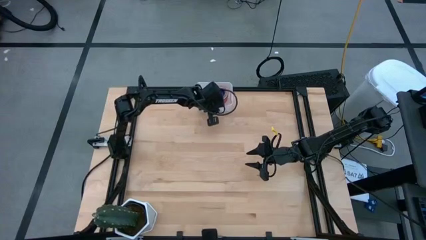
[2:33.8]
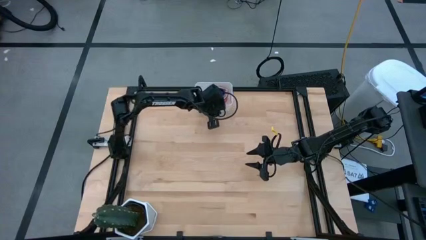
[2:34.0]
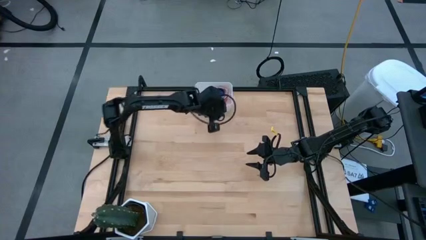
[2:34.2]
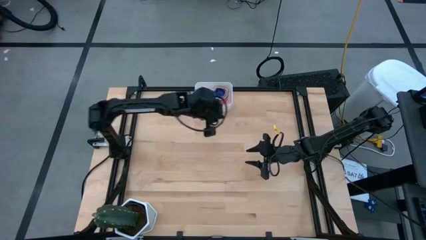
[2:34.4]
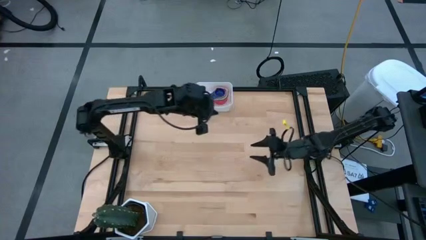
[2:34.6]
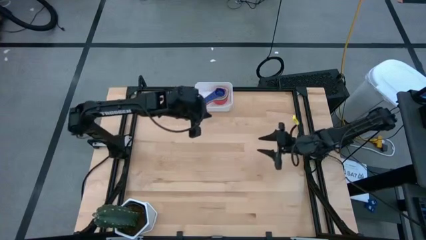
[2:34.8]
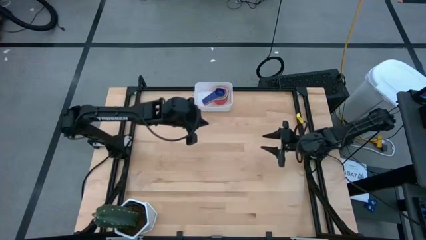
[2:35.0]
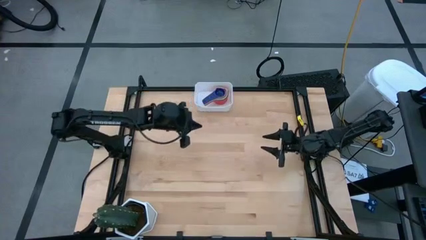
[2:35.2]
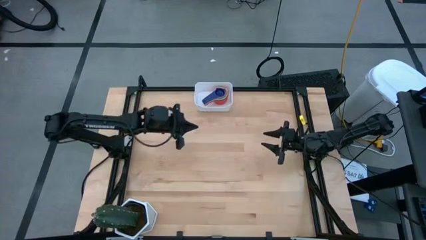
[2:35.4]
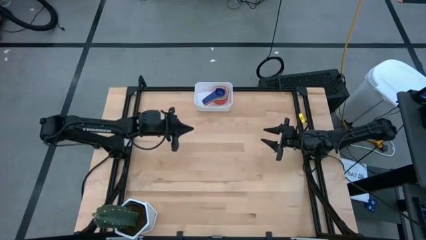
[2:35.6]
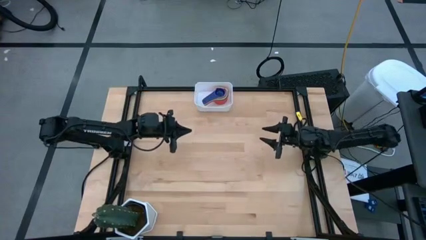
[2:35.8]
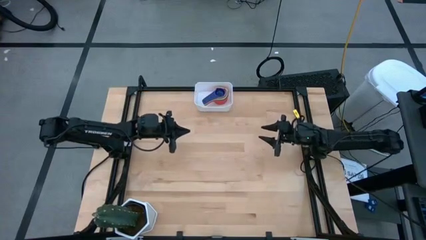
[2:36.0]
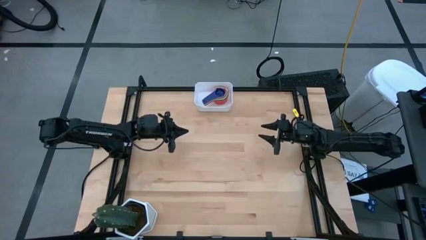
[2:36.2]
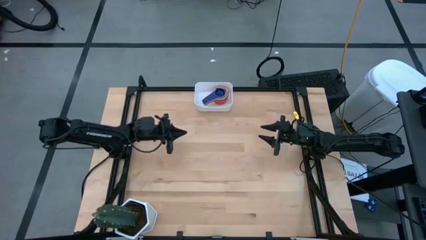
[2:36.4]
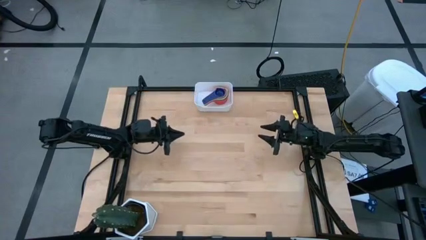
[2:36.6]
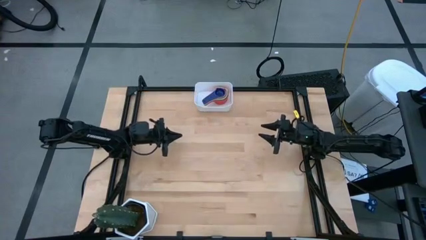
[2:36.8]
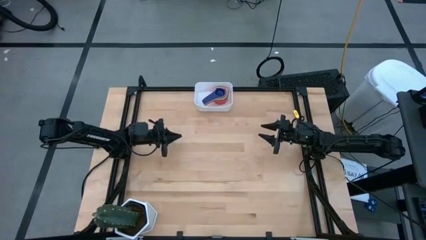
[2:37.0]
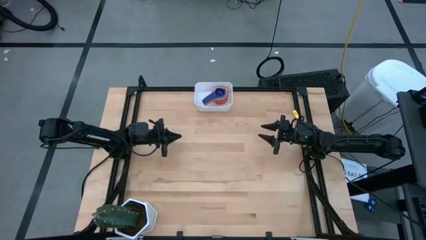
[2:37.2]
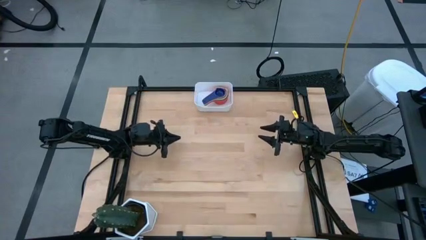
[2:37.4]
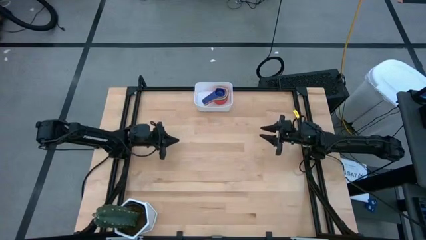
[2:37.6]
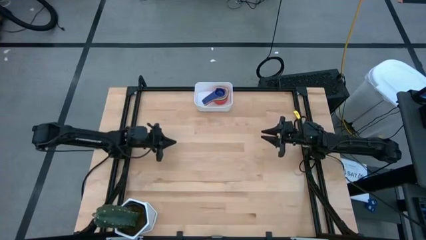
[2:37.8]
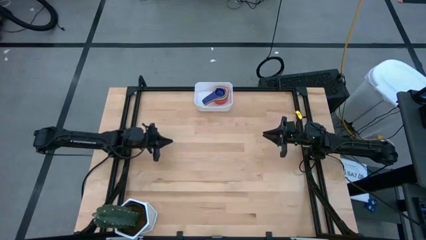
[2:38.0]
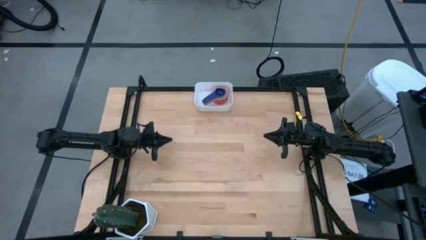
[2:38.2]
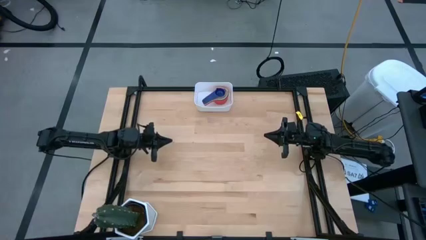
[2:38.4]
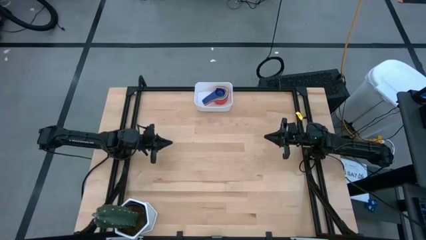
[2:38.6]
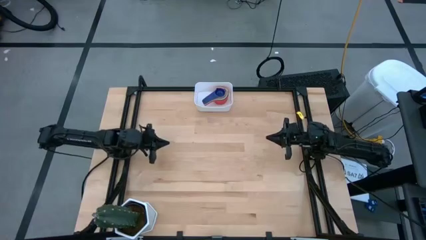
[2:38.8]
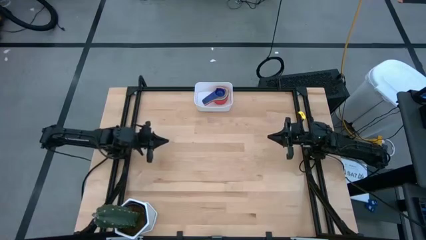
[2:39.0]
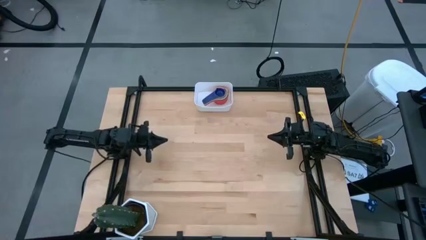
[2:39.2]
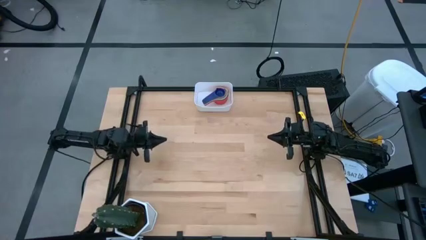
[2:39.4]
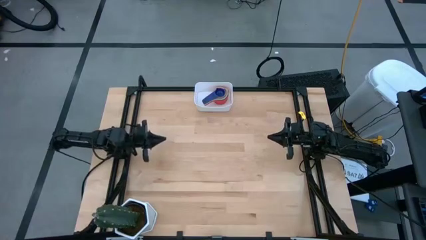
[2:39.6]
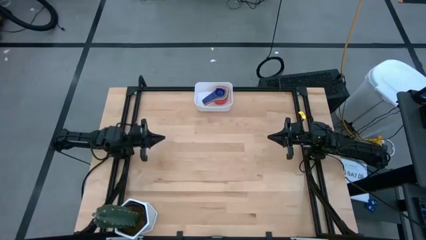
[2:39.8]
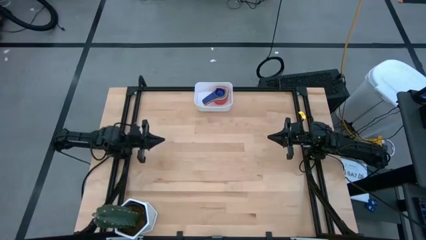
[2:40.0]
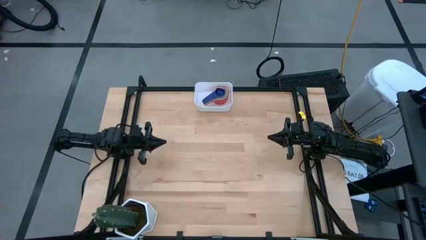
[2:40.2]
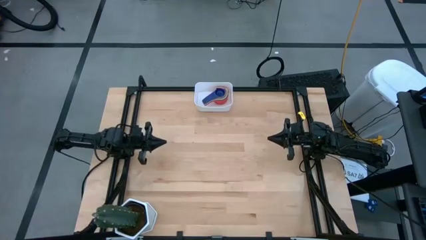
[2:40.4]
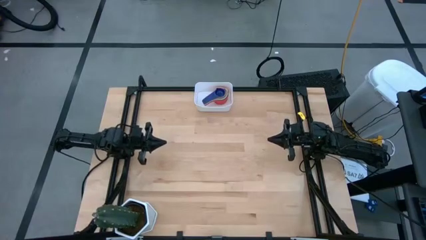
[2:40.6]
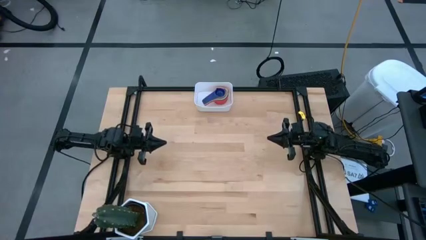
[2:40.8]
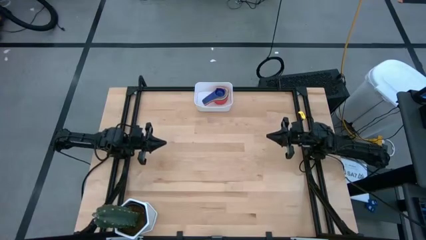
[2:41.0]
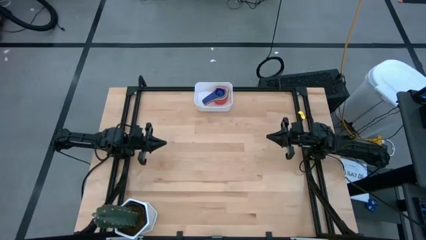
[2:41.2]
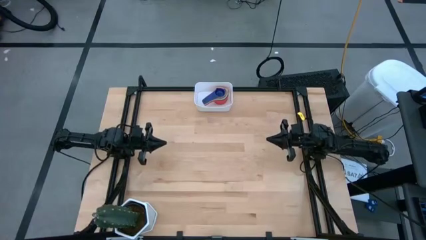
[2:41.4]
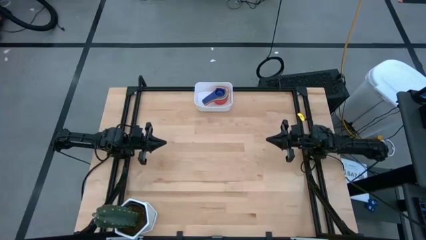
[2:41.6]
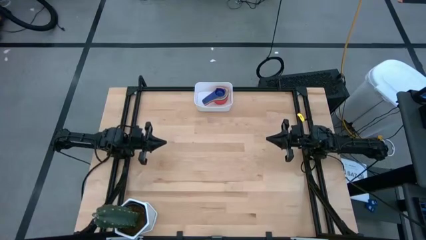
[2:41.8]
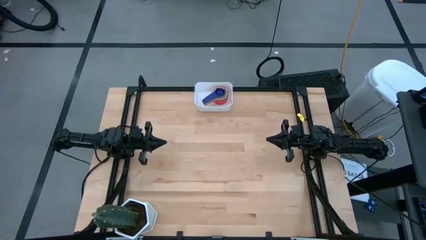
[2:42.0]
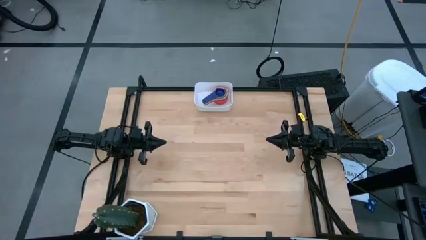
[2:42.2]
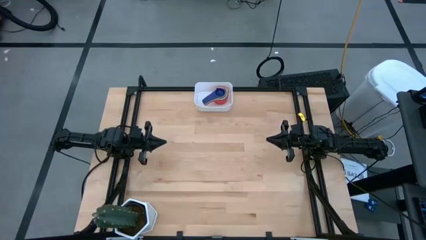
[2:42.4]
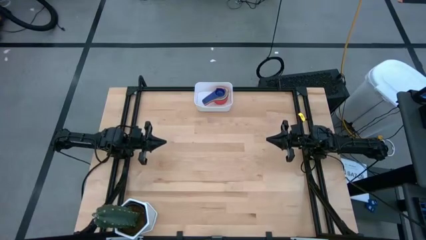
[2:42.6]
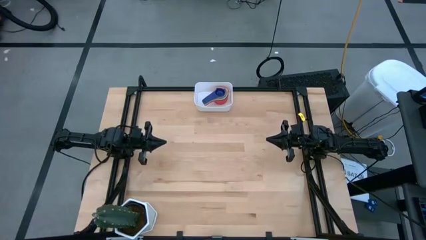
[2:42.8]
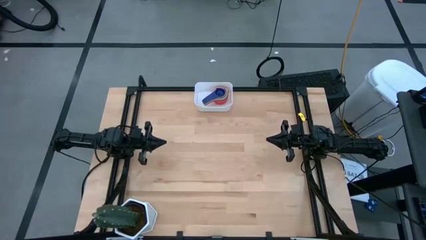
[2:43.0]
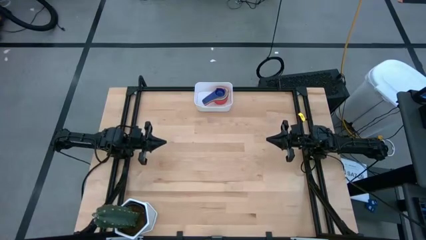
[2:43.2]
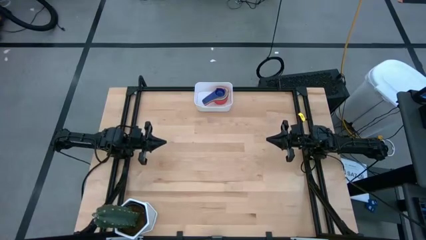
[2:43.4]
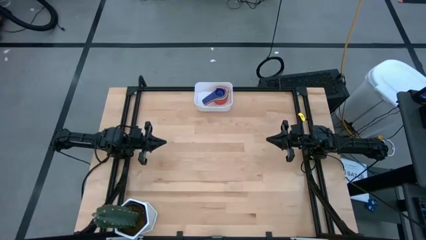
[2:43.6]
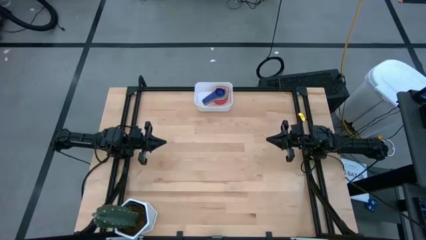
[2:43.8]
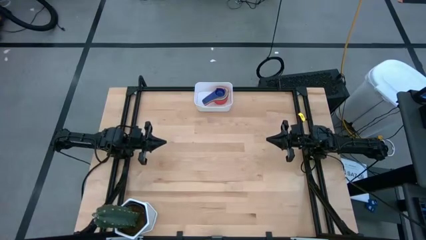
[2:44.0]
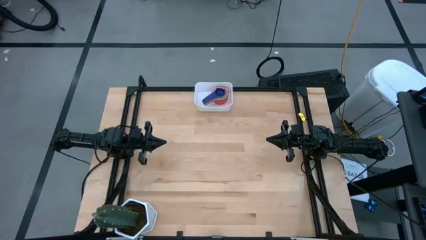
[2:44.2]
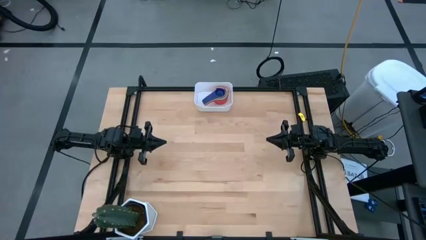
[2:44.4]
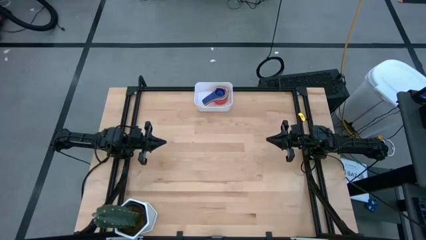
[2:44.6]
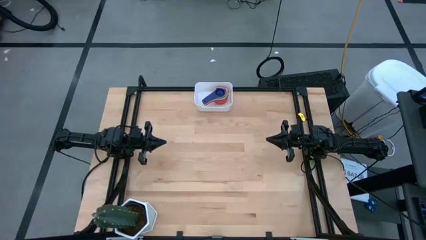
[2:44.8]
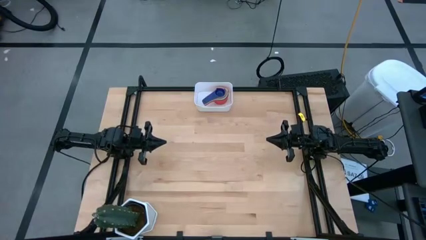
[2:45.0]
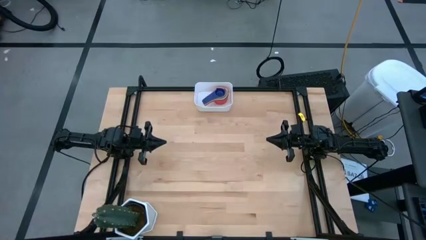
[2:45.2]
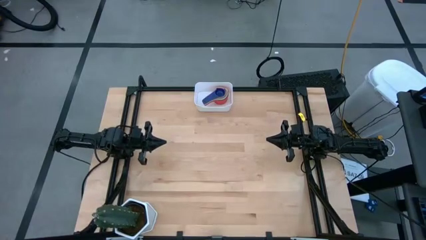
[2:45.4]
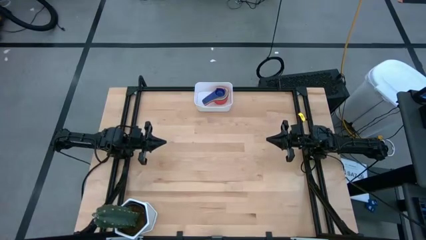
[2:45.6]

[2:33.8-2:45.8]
Task: Nest measuring cups in basket
Return to Home Position

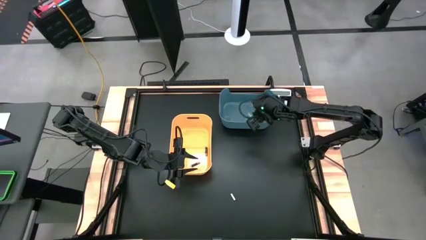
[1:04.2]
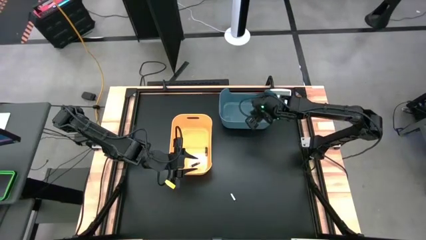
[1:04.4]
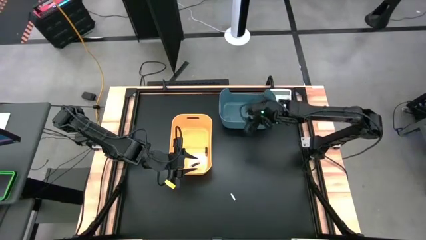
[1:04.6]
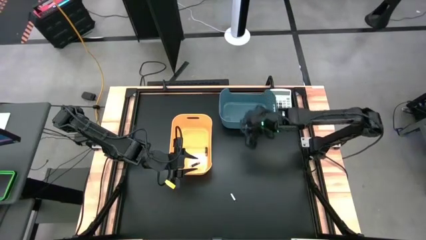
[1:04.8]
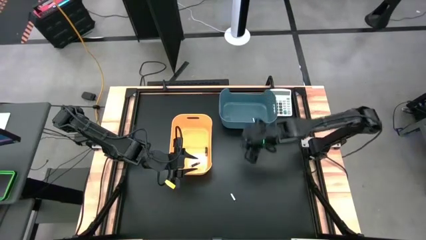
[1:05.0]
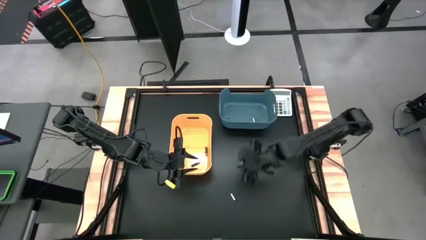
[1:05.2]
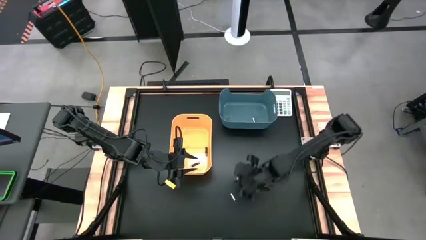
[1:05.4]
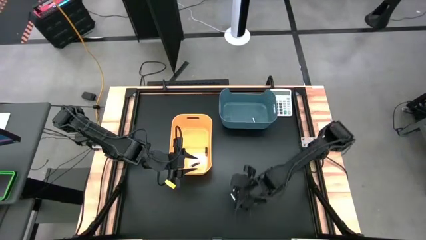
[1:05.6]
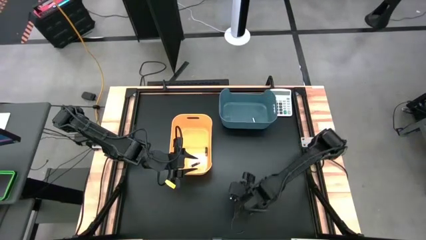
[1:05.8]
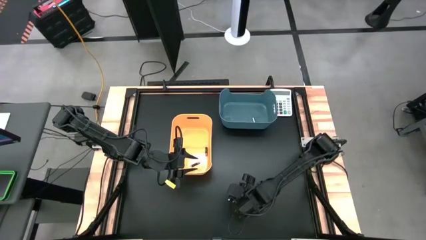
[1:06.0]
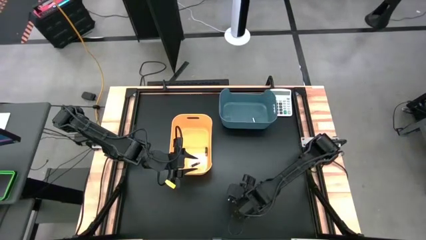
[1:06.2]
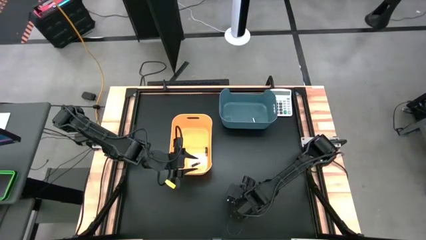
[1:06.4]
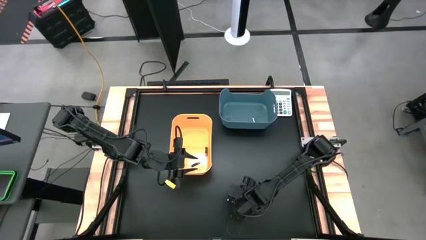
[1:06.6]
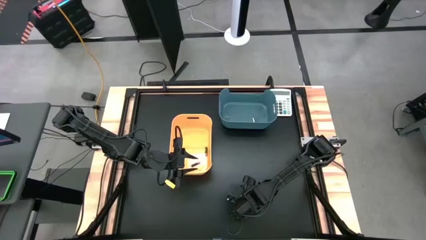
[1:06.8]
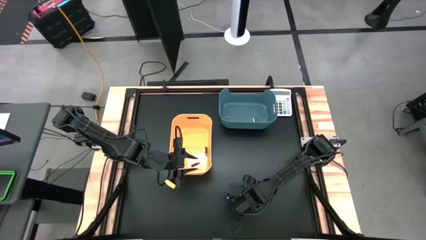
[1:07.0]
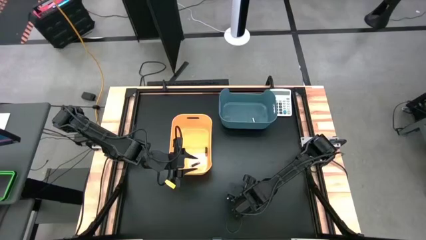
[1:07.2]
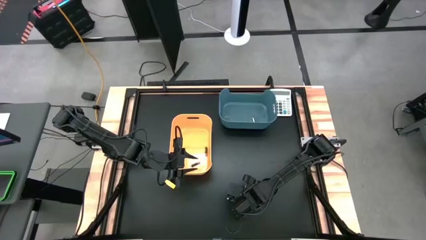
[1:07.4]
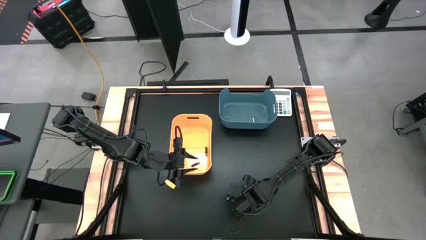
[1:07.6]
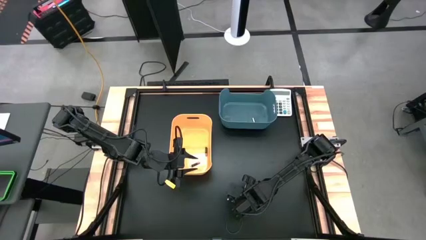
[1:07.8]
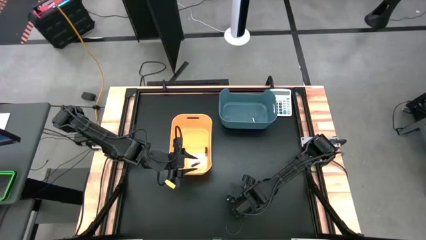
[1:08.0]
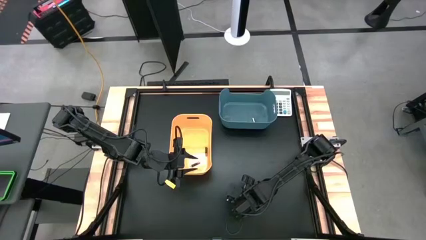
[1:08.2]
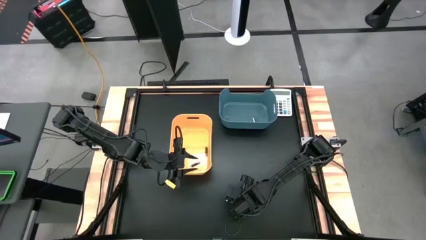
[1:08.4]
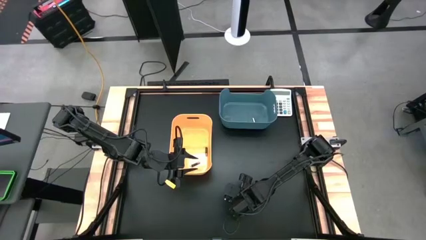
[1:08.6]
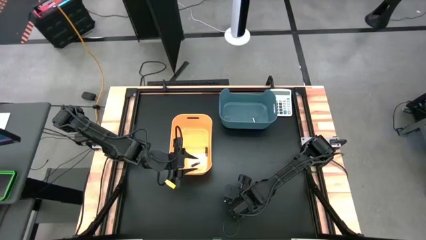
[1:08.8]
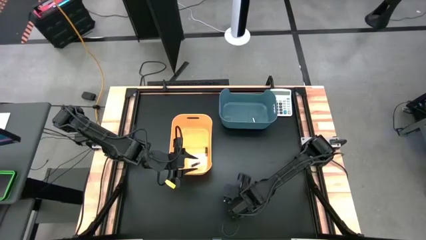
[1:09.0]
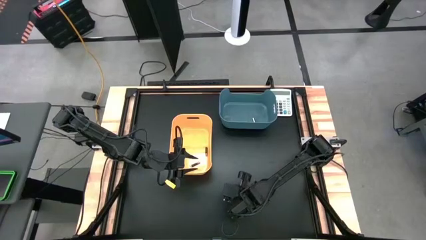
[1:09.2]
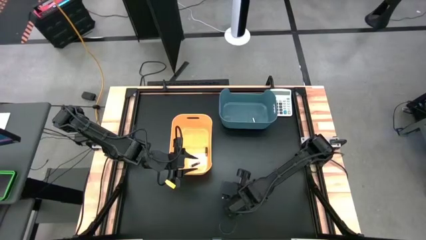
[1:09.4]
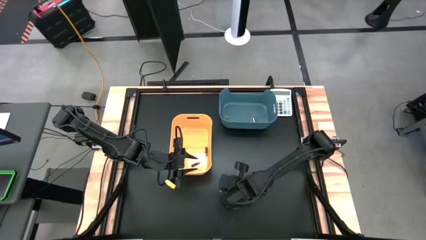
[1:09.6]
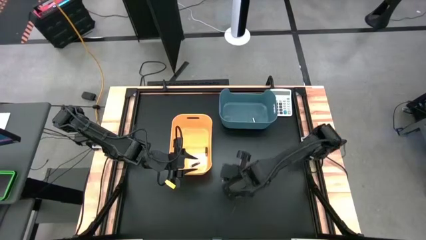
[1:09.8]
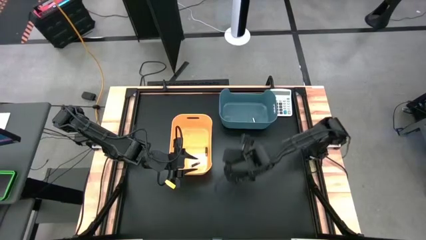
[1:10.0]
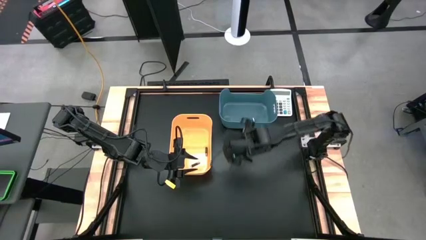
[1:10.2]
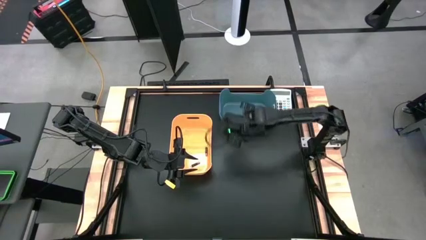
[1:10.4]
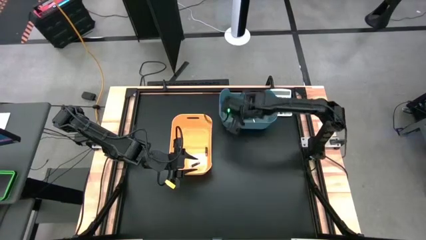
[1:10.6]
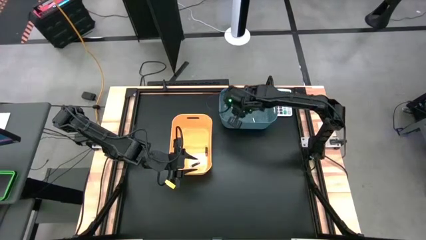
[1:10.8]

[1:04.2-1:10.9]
Task: Sort batteries
Put the silver battery into the blue bin
